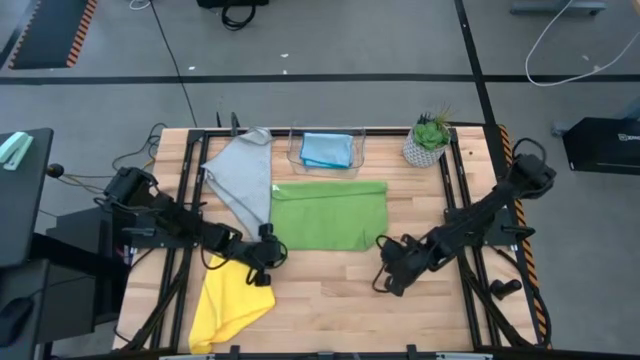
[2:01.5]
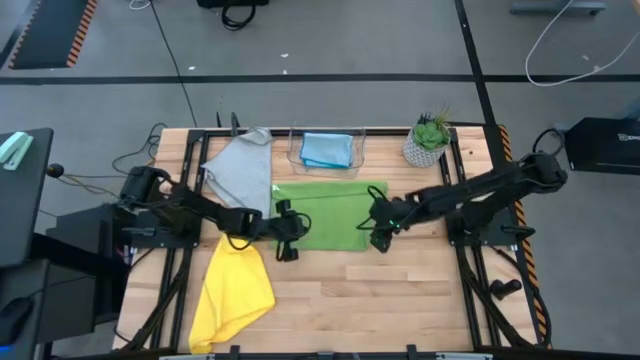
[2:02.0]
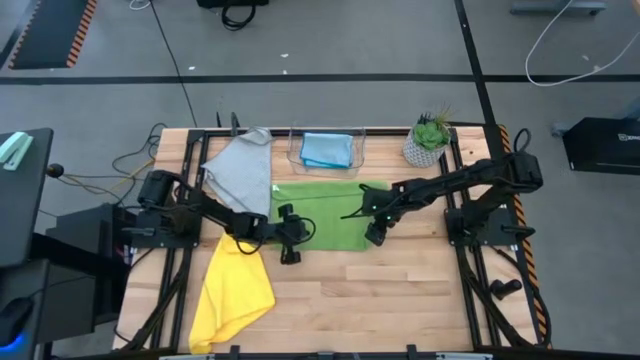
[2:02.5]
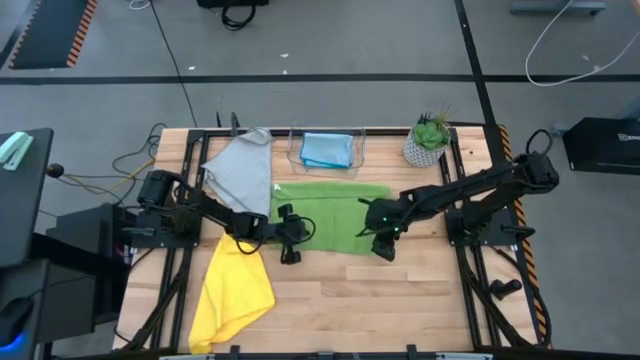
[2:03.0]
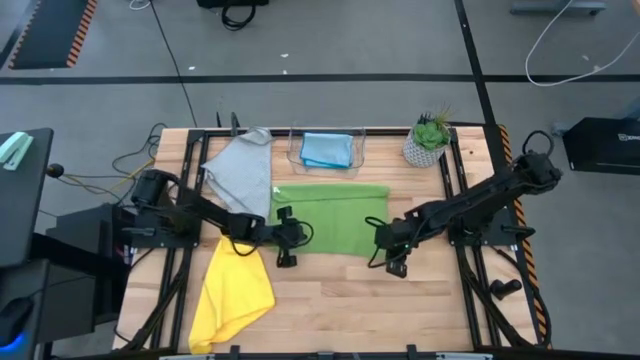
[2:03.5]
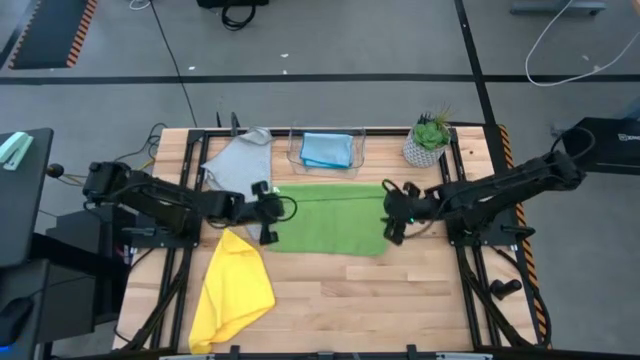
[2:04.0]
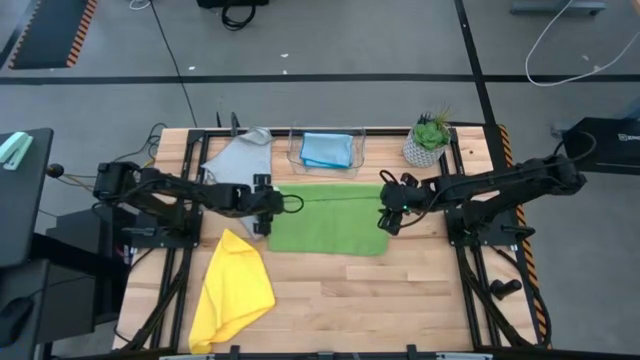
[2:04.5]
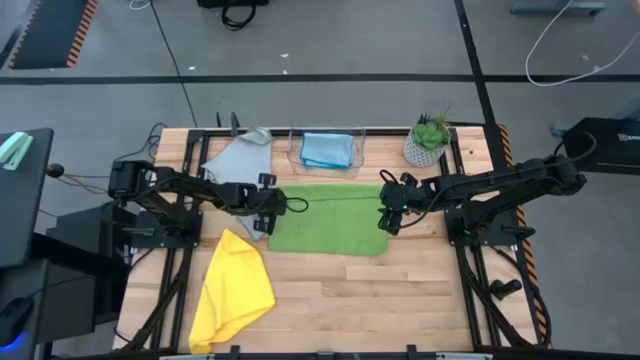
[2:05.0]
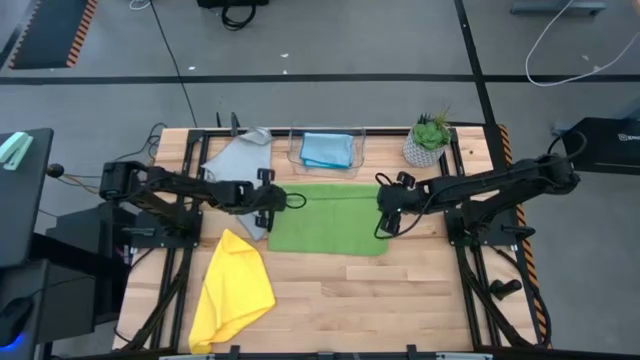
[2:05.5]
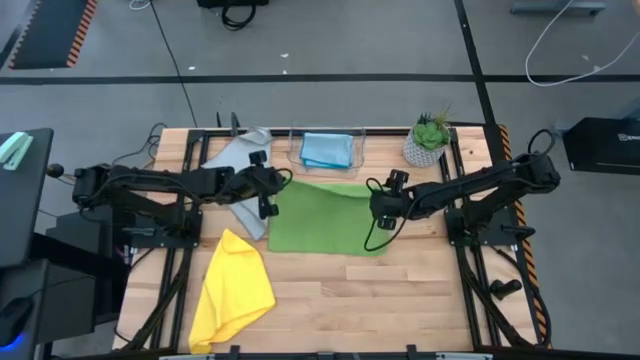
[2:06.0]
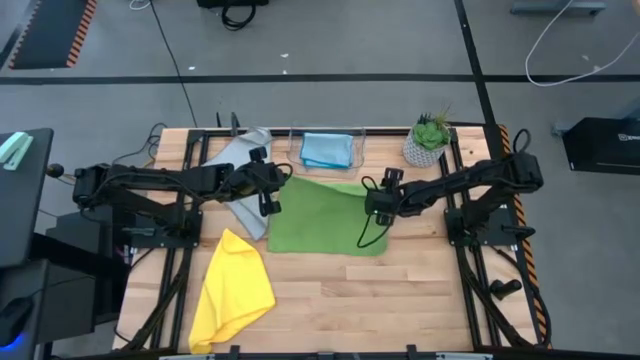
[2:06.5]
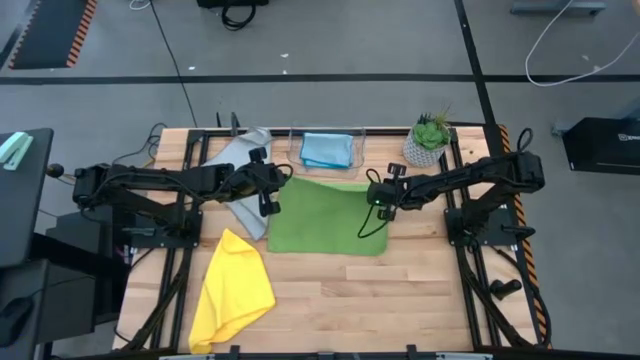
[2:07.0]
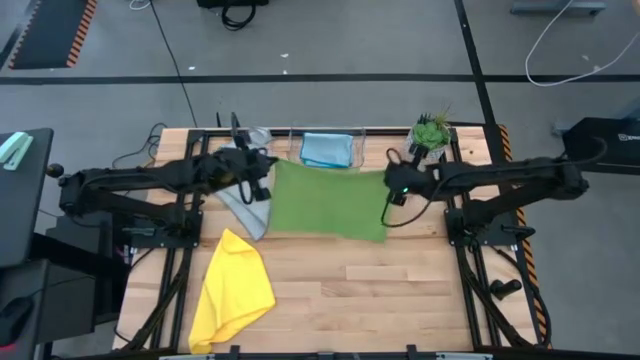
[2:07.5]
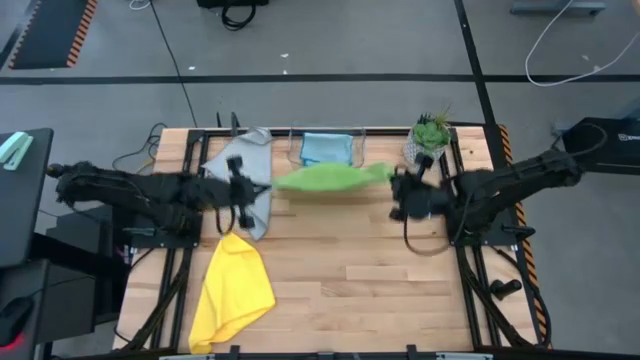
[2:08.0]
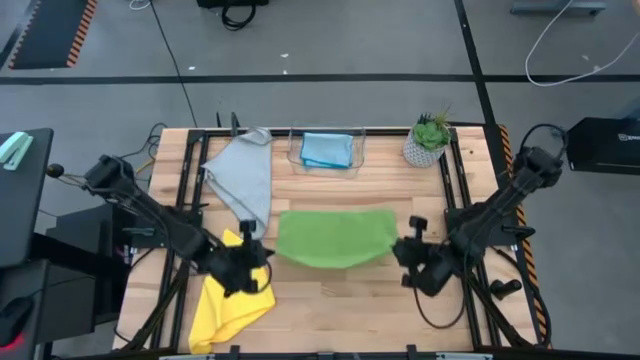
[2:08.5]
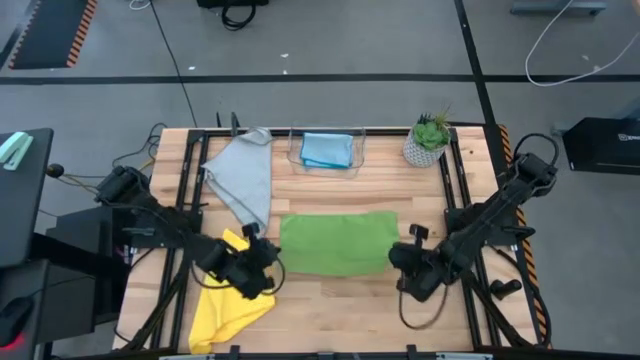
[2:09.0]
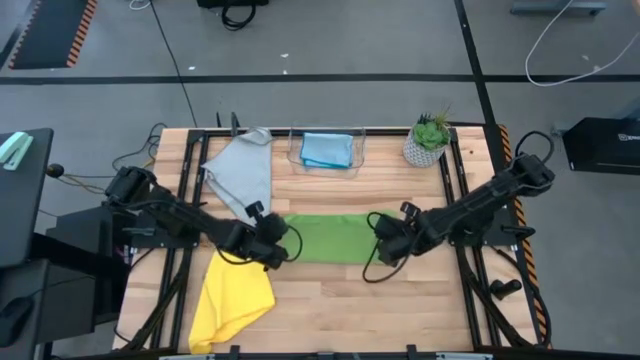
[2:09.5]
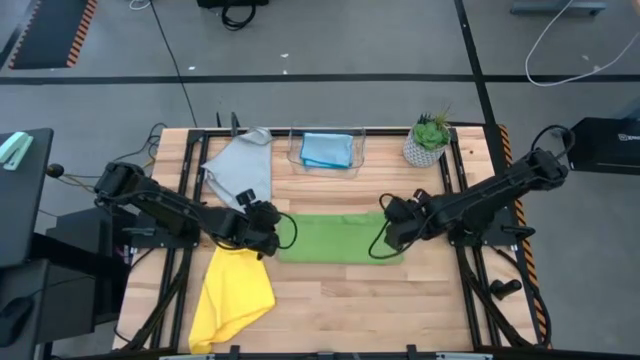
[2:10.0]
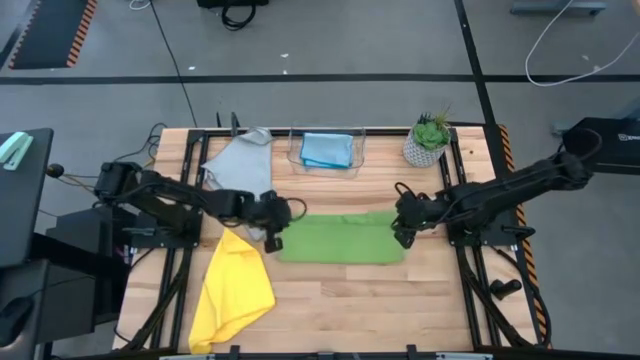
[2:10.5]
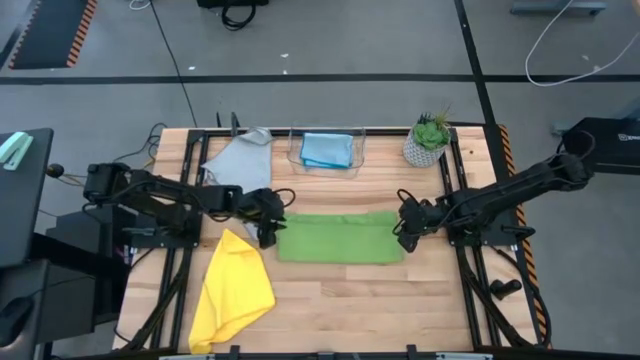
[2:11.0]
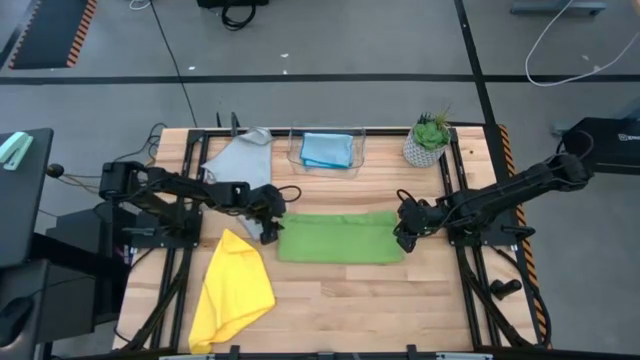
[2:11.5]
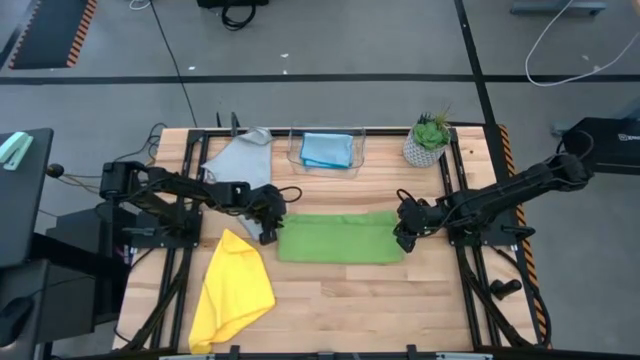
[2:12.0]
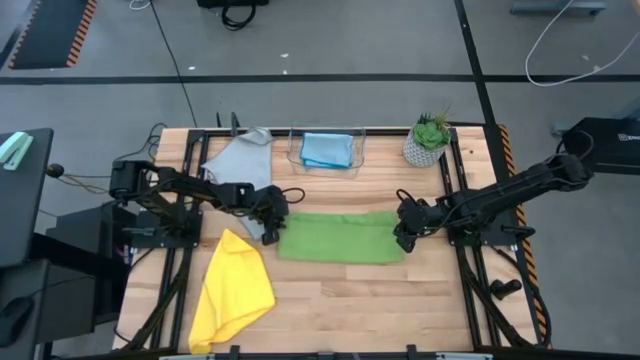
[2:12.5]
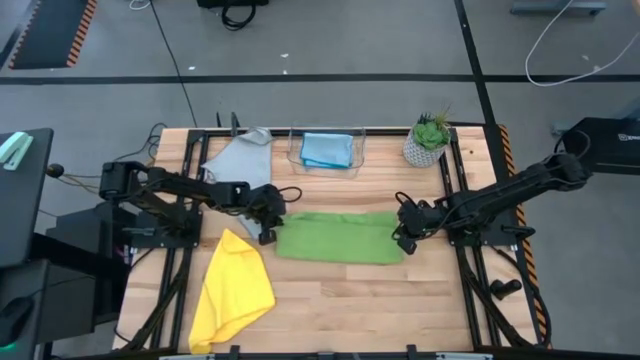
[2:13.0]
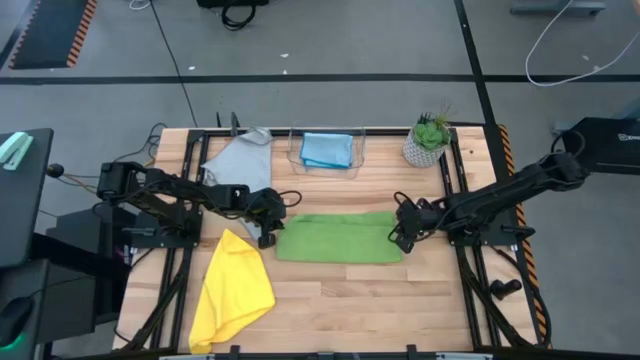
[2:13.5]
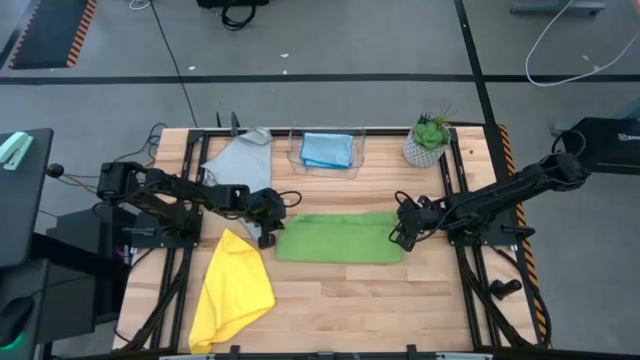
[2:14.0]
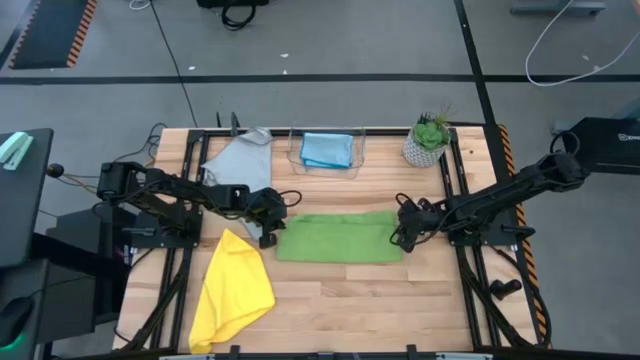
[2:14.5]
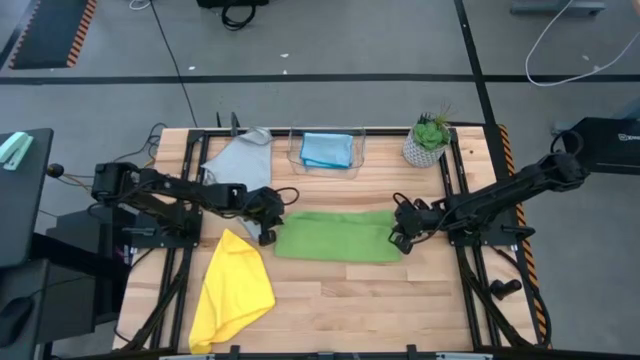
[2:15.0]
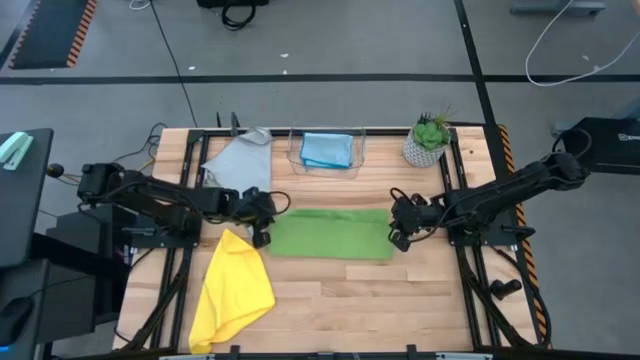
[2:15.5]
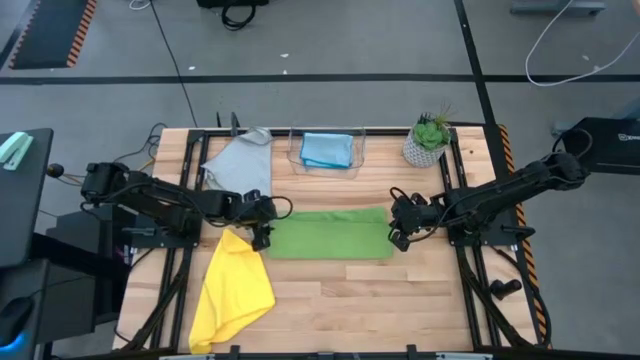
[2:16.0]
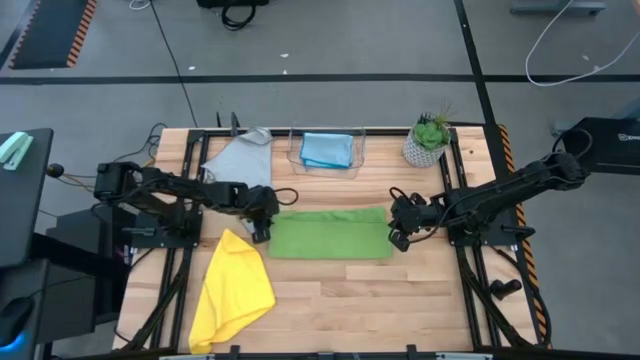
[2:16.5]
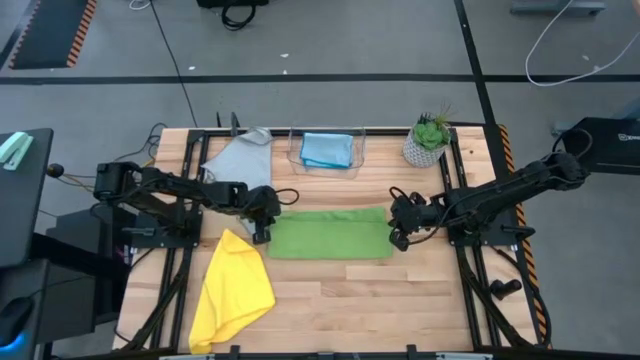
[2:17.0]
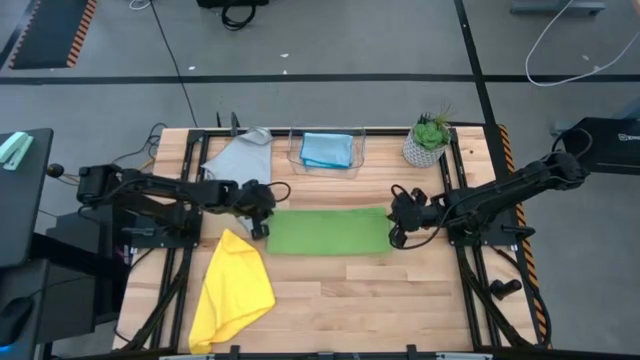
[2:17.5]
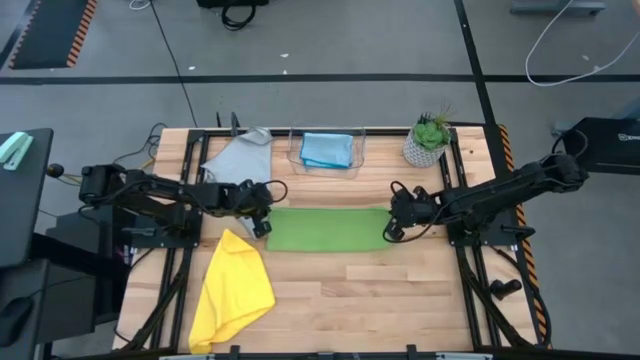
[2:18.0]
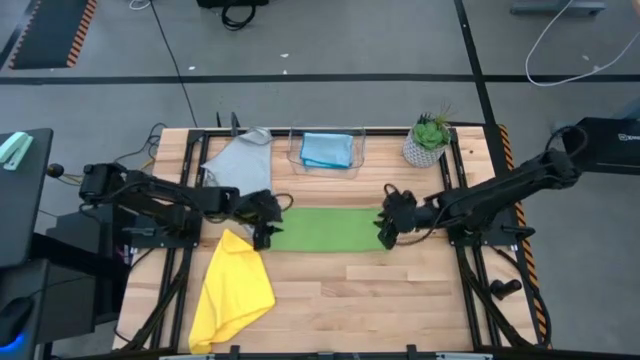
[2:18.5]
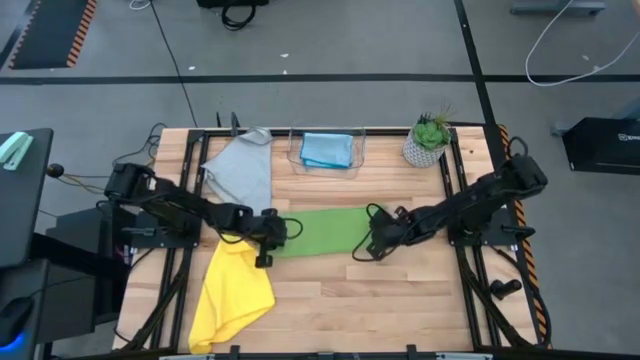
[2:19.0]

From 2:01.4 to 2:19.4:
Task: Fold microfiber towels
Fold the green microfiber towel
